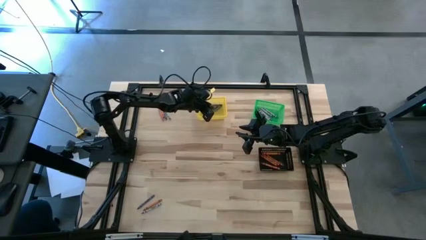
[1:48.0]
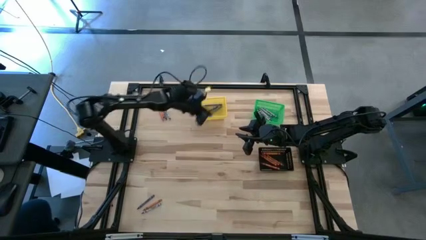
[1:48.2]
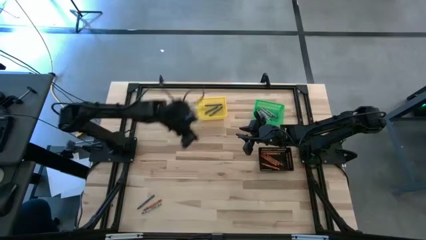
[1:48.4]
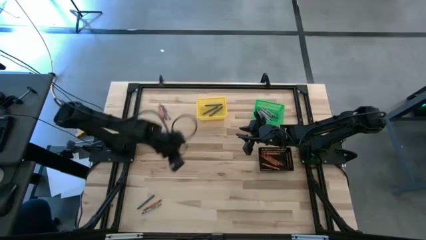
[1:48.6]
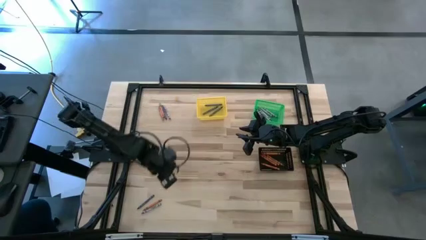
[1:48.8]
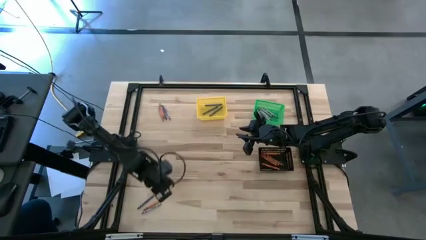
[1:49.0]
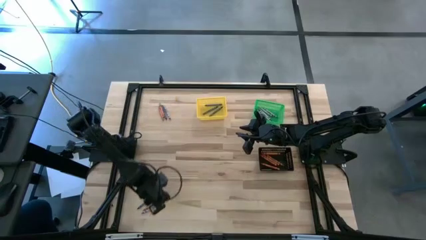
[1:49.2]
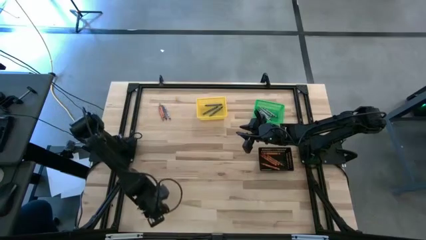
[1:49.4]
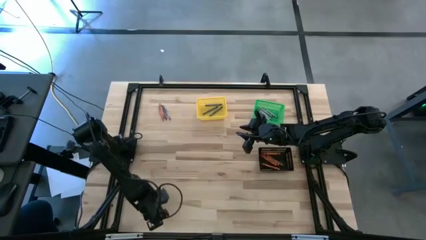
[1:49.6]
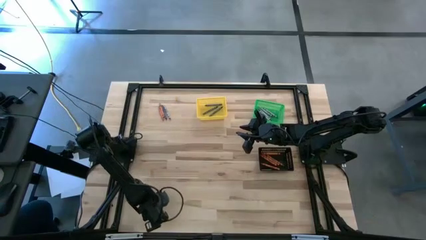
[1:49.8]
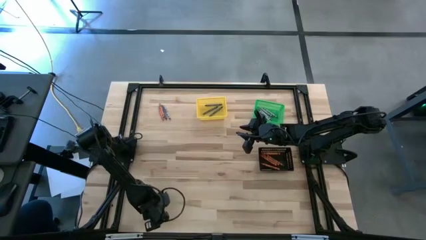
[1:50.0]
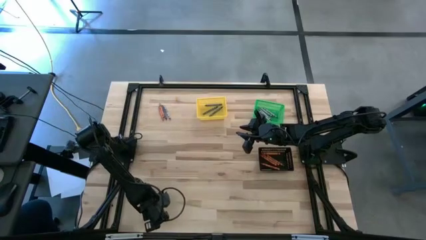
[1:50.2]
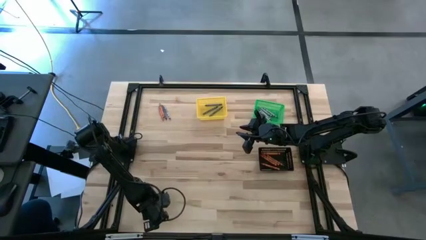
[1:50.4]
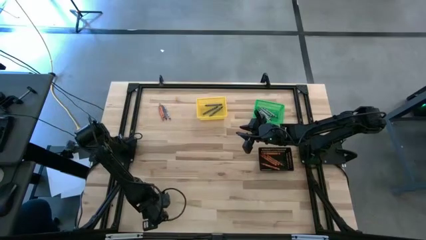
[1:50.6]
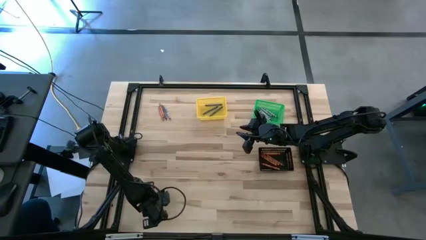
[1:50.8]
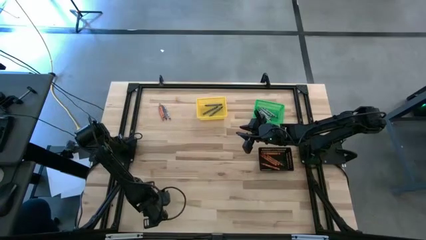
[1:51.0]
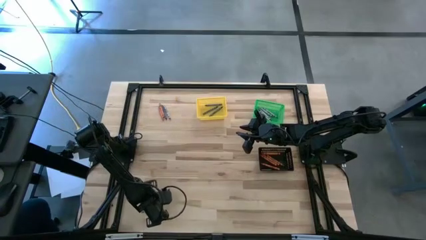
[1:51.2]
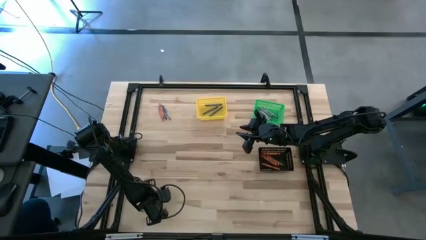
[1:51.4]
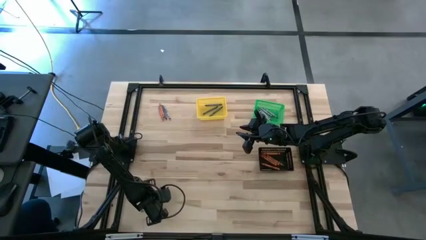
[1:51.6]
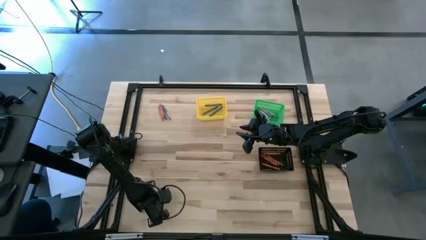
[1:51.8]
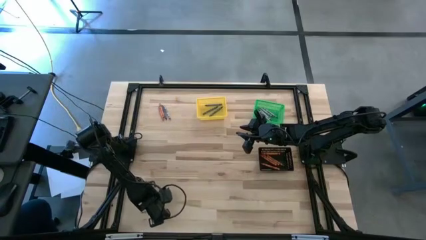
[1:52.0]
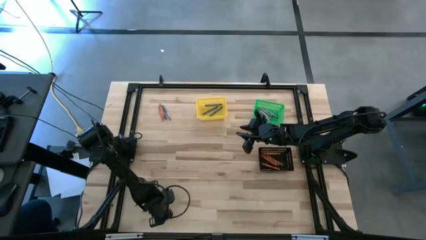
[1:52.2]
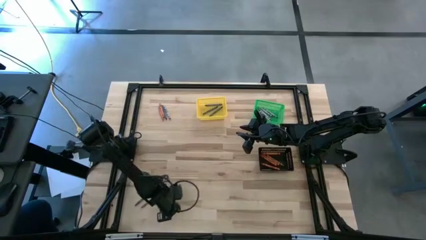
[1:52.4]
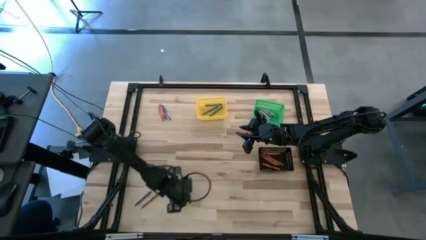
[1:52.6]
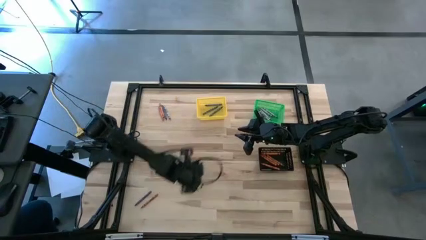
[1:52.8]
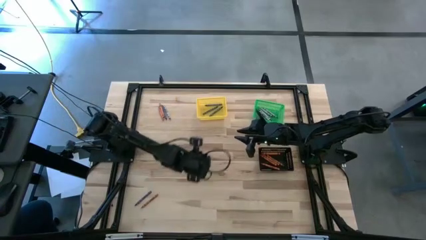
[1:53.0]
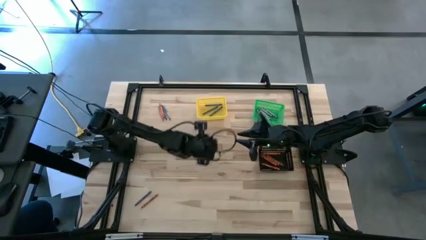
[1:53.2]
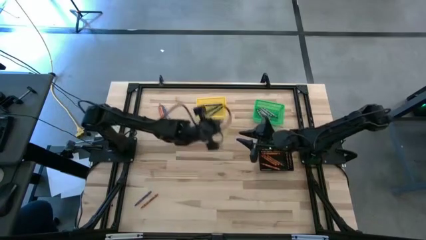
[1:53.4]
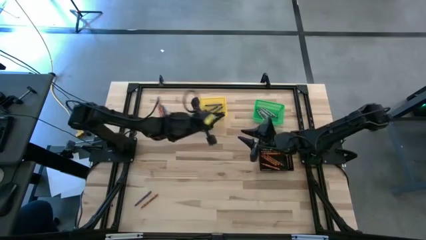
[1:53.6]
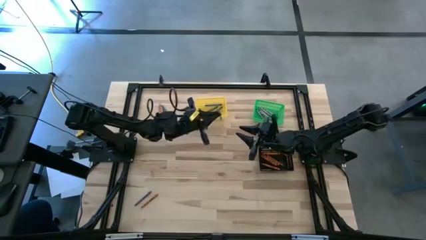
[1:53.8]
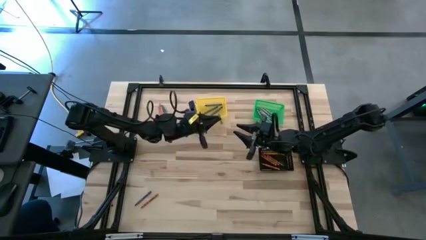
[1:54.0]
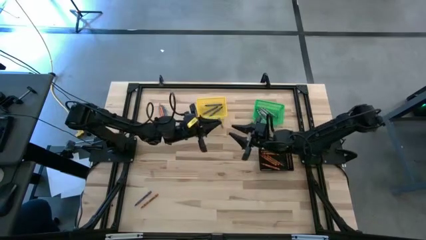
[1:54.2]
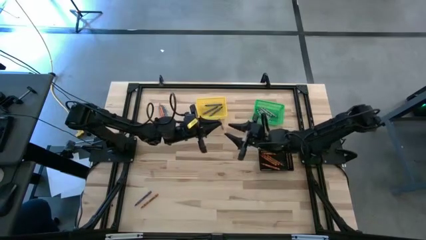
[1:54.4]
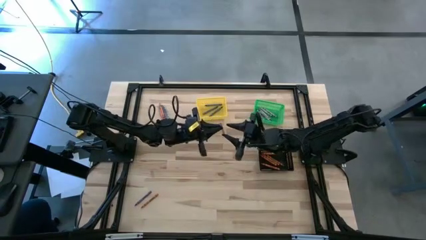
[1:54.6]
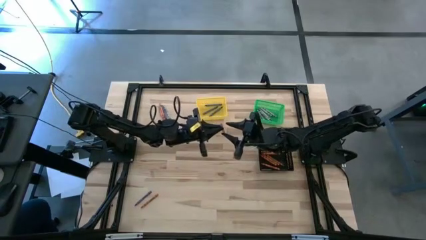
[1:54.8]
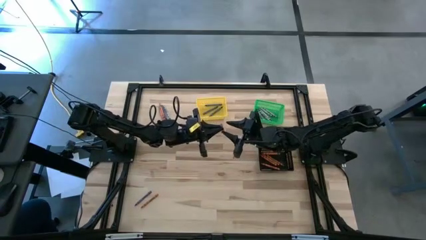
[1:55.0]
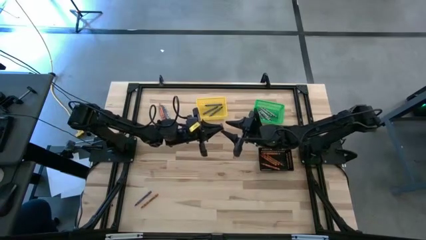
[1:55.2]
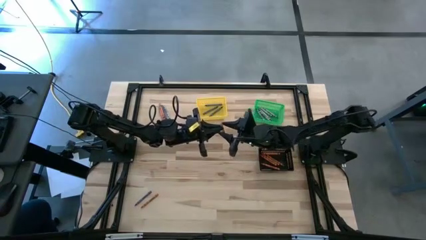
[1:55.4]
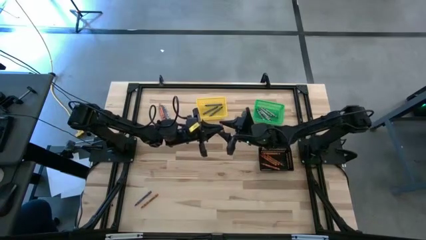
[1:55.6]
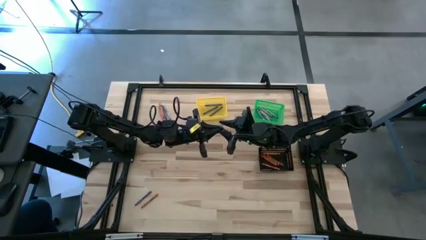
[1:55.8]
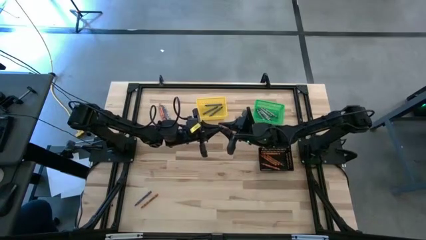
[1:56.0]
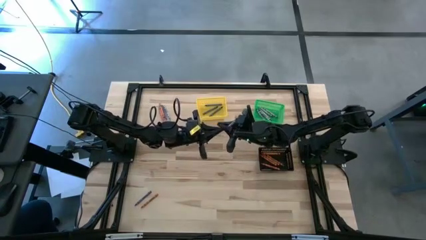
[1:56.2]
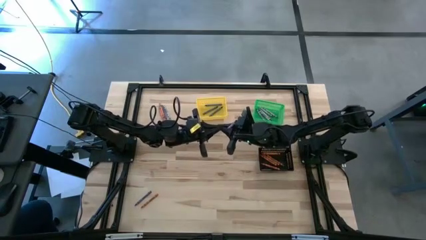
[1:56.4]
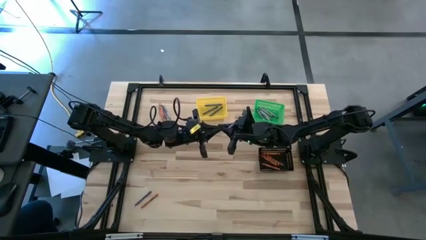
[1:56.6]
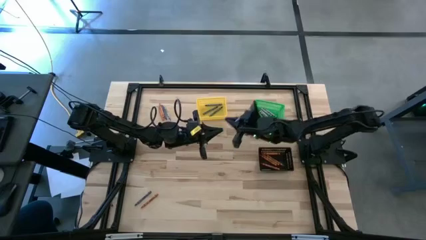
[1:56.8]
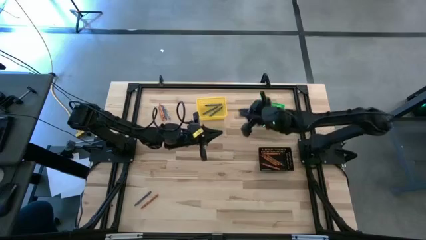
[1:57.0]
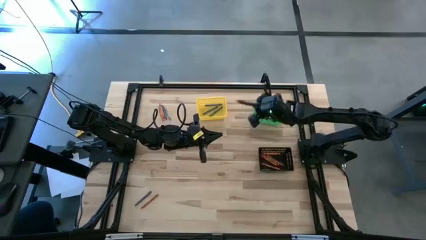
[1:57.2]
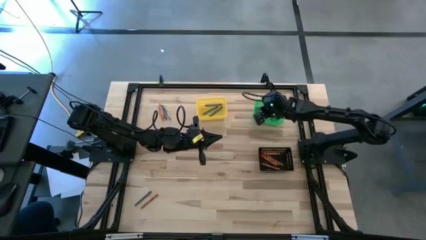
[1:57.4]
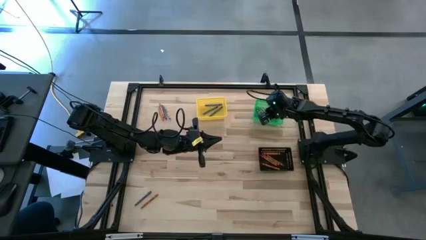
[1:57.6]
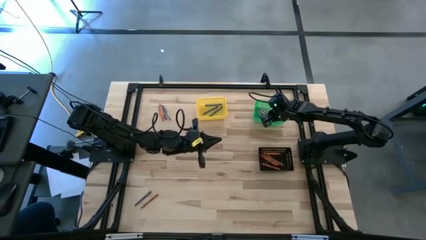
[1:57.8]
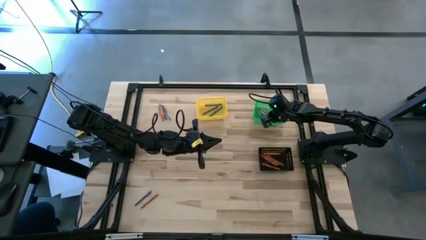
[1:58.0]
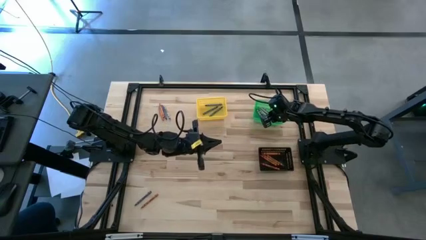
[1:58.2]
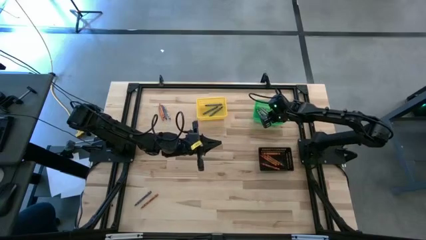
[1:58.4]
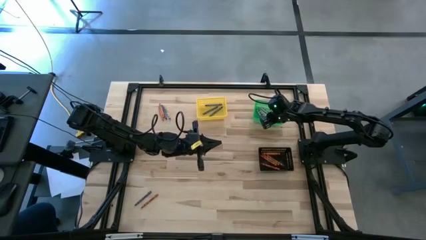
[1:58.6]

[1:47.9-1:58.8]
Task: Sort crayons
Put the gray crayon into the green basket

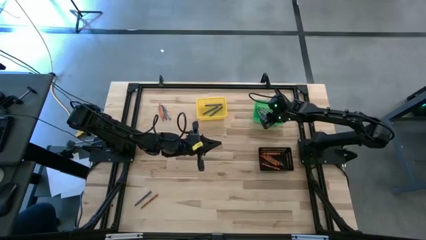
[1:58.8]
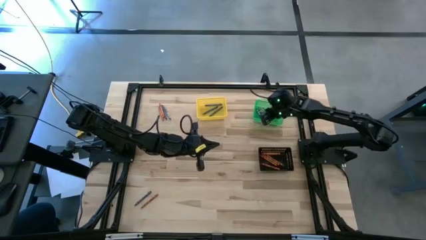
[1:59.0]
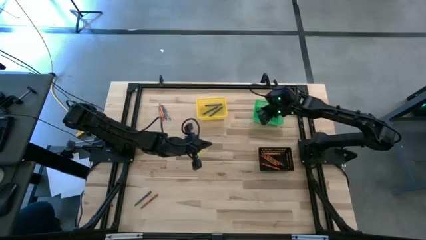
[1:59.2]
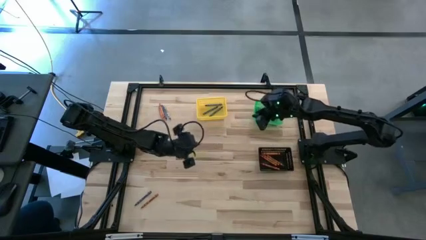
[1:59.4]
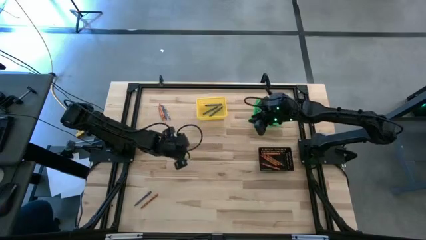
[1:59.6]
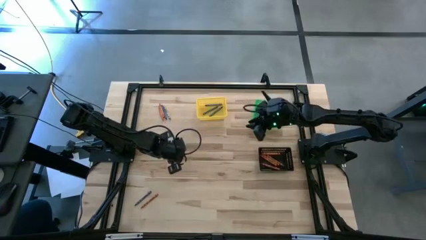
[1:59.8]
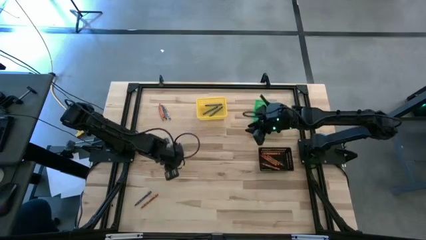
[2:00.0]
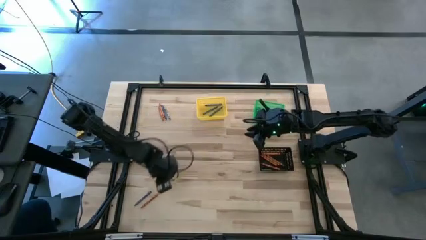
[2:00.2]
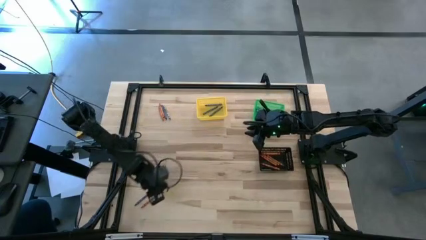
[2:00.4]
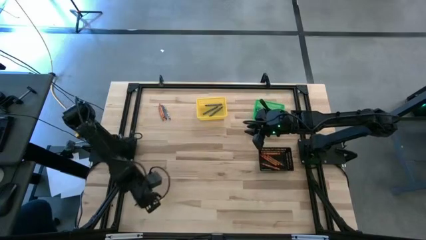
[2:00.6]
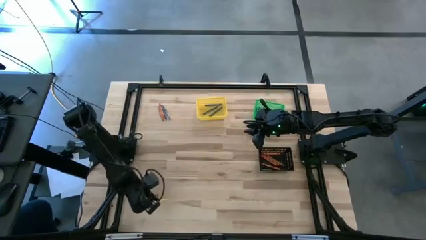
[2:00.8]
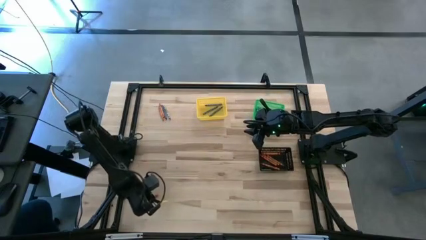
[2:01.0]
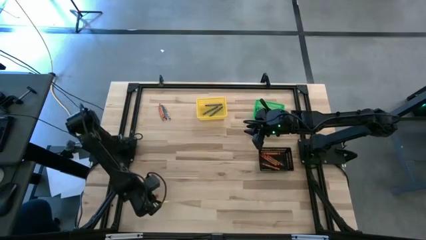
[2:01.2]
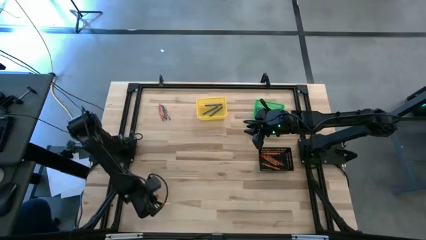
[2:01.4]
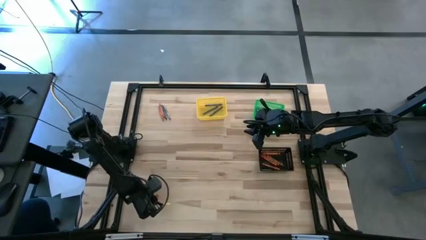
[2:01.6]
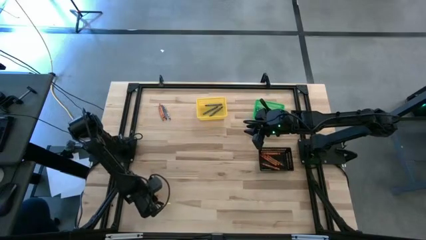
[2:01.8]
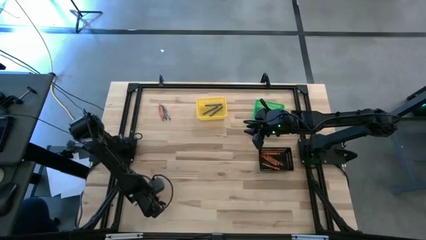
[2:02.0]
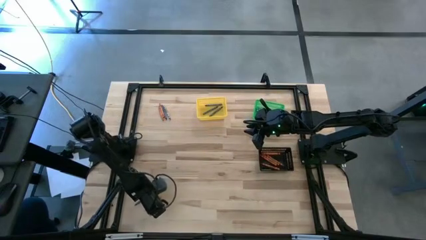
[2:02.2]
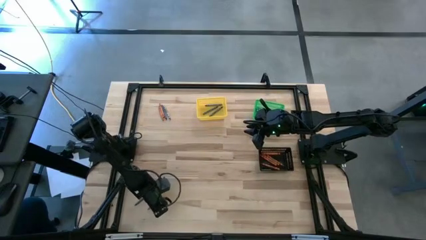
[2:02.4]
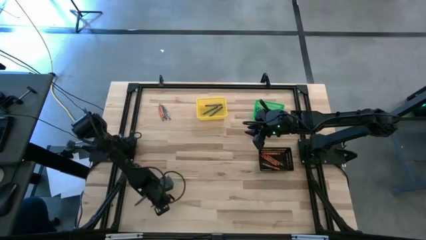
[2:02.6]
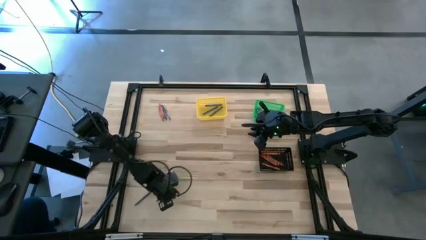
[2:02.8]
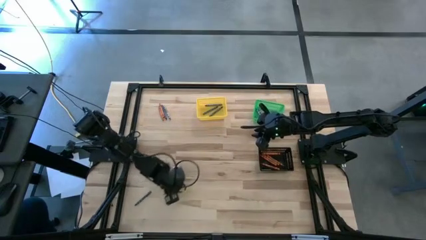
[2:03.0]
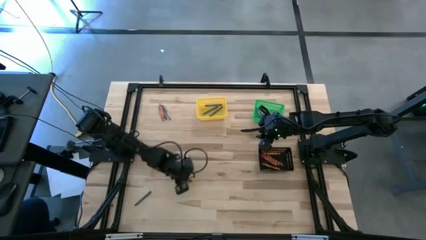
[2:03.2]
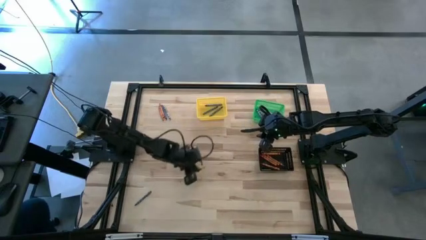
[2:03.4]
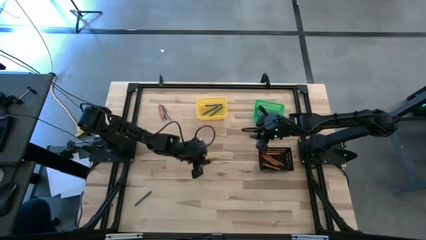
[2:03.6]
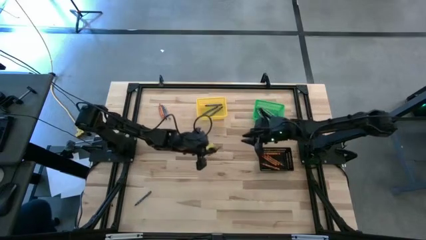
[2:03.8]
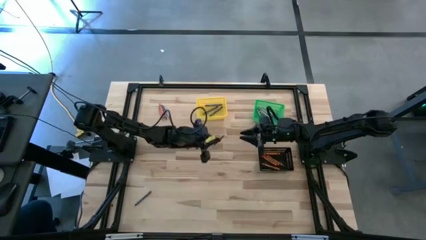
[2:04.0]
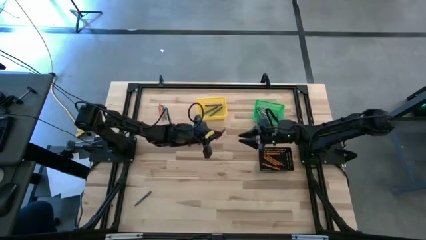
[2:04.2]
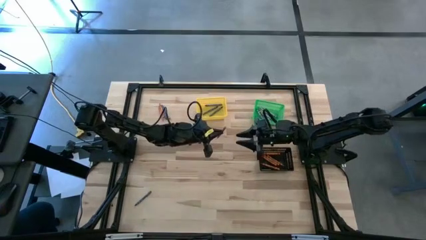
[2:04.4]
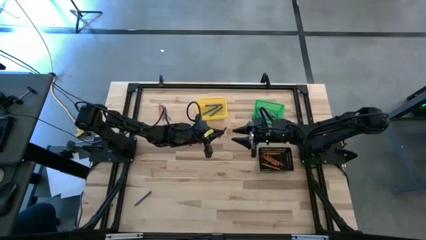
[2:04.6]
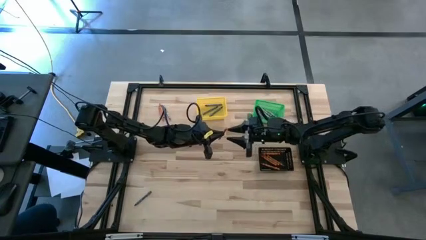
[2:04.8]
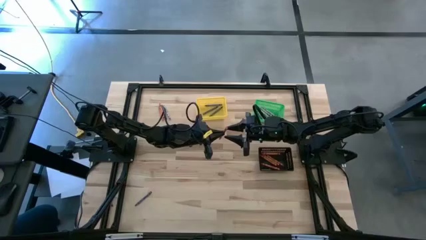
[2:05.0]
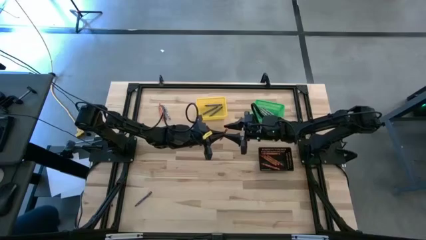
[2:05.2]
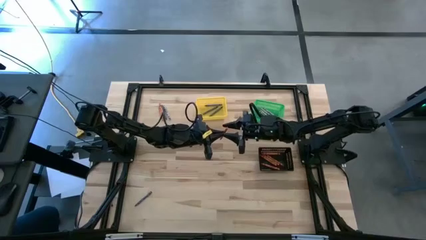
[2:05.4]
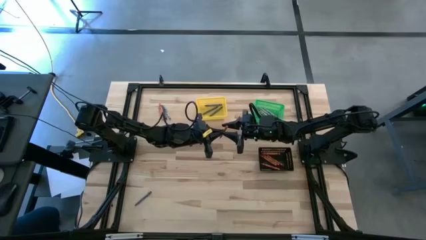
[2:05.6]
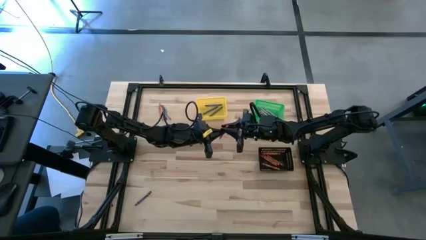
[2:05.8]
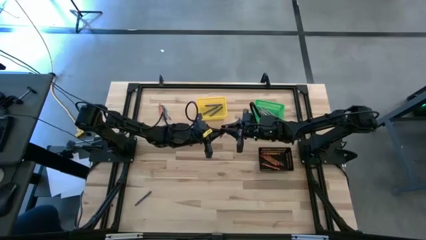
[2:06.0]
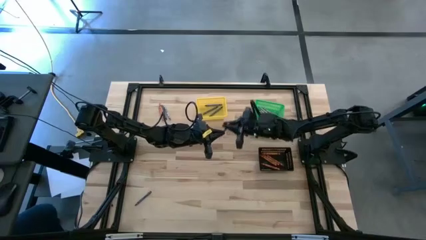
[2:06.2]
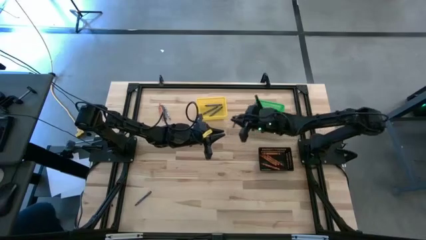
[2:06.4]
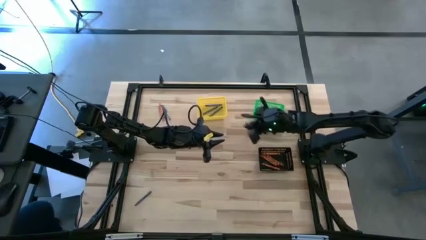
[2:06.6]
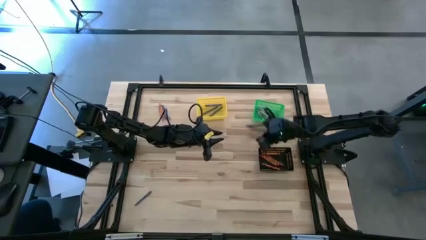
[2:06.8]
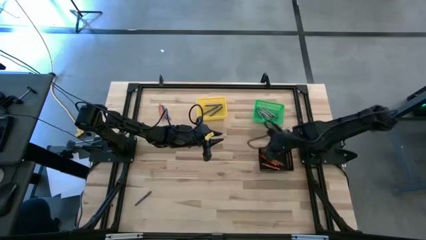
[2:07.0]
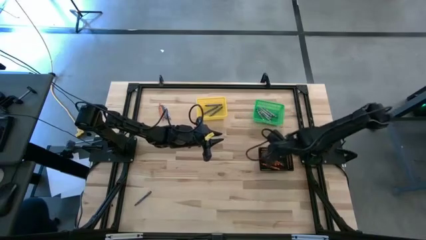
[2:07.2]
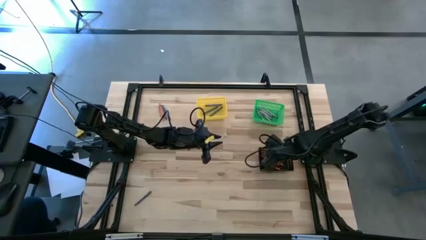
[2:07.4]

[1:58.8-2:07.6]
Put the orange crayon into the black basket
